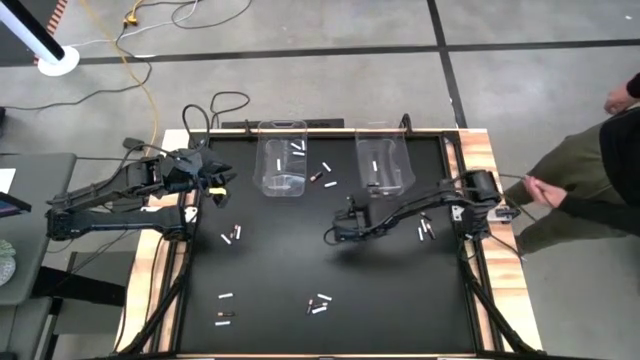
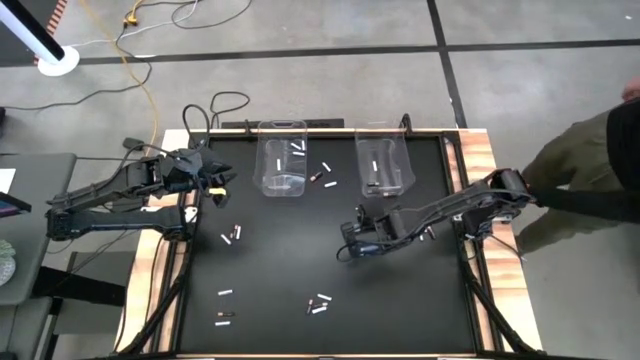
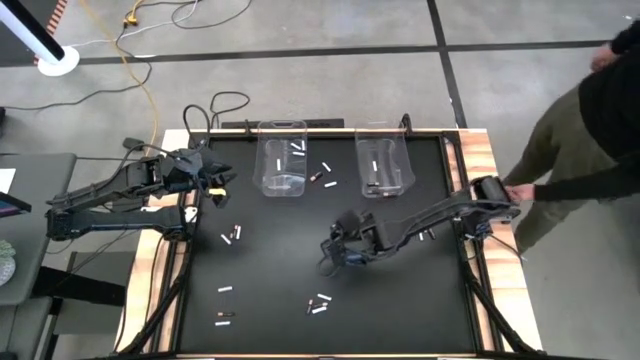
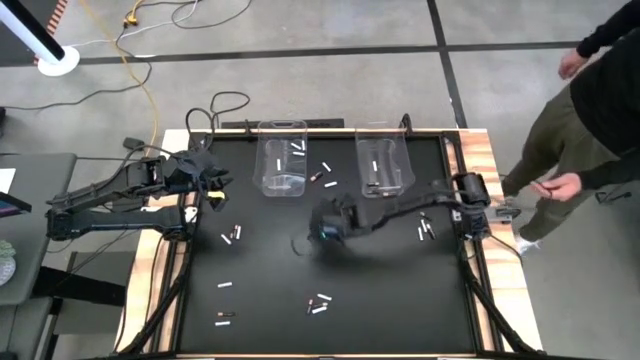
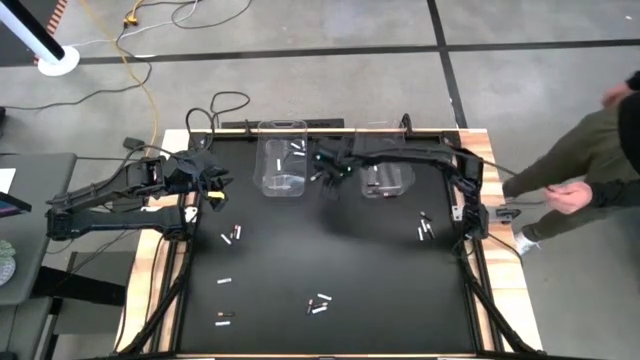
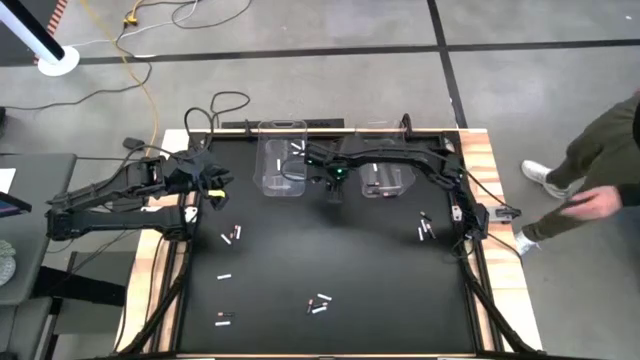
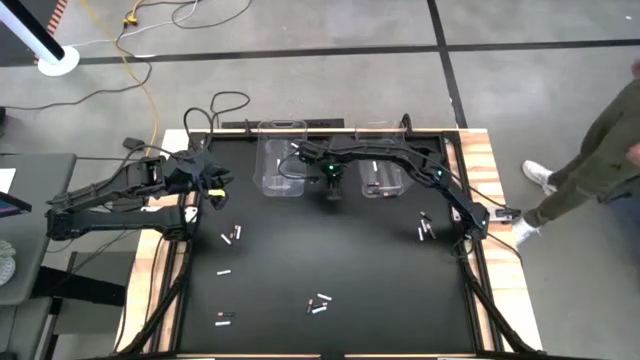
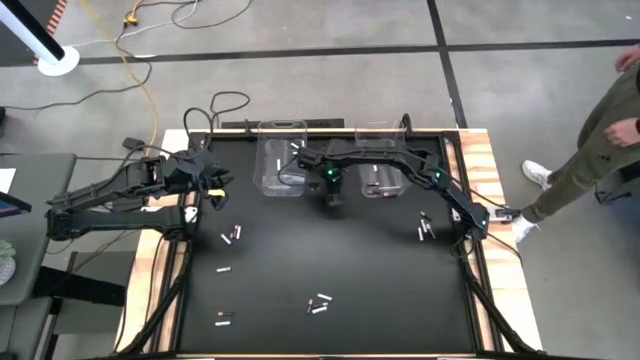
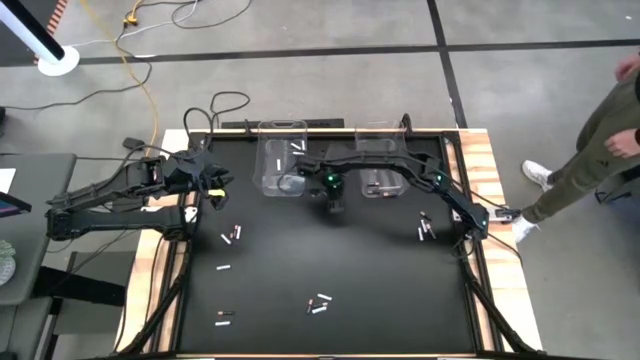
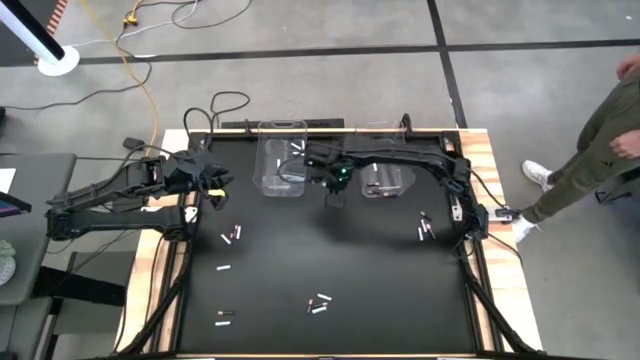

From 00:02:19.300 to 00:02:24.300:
Task: Sort batteries
Put the white battery into the left transparent bin

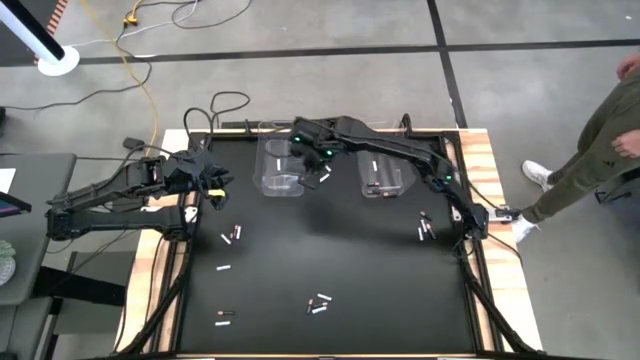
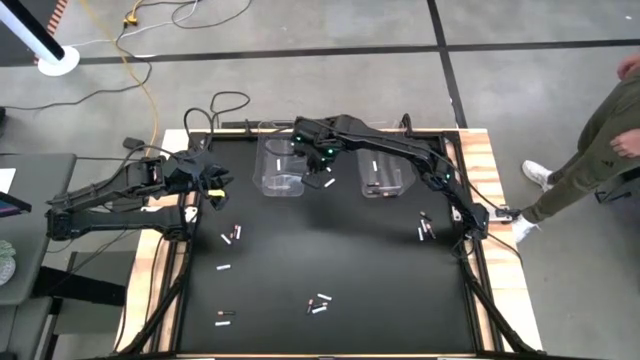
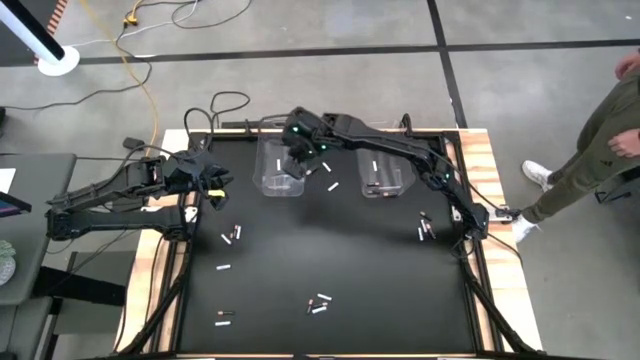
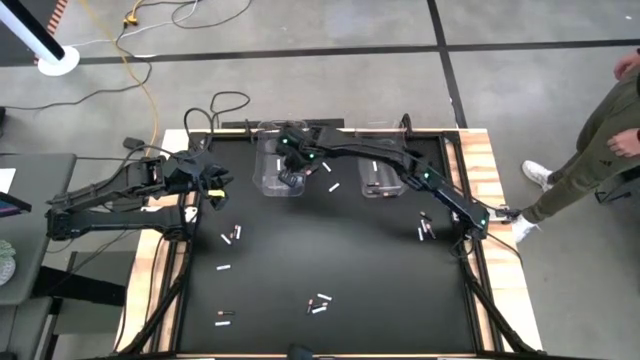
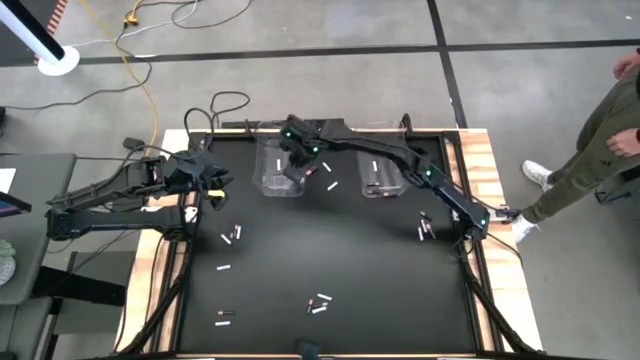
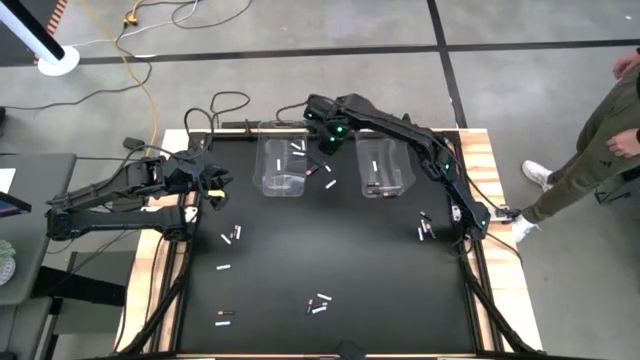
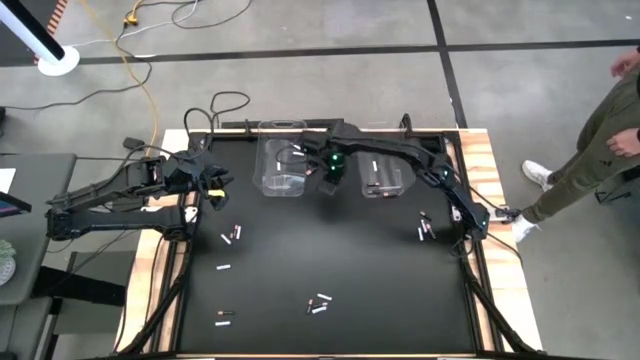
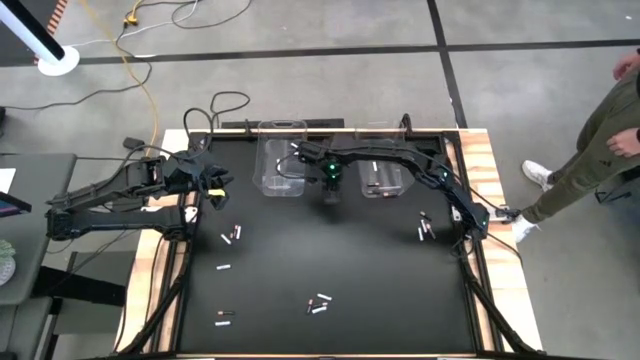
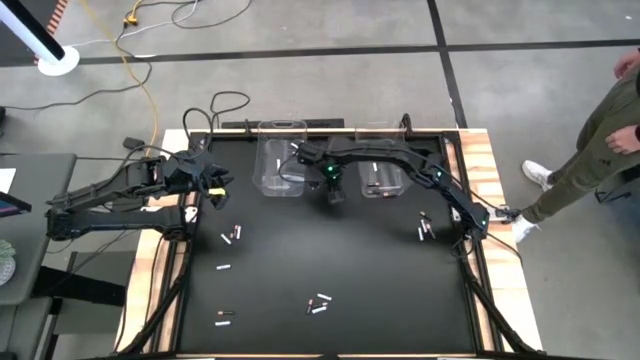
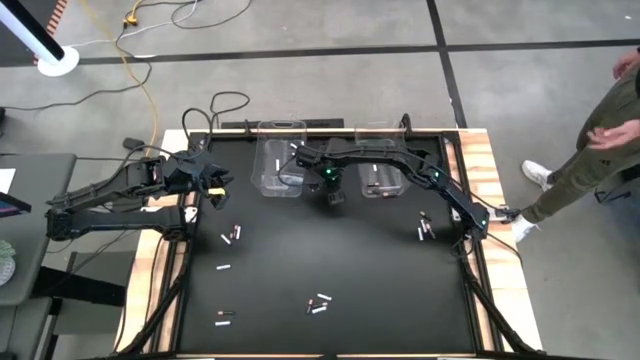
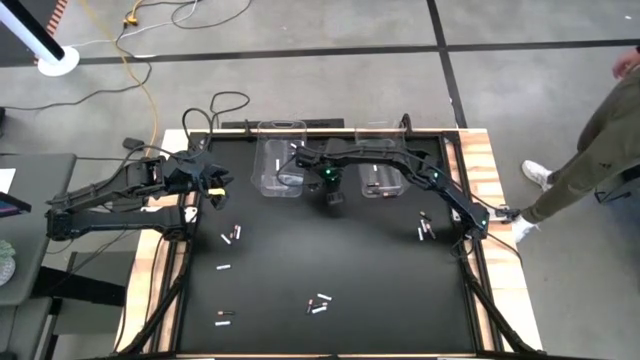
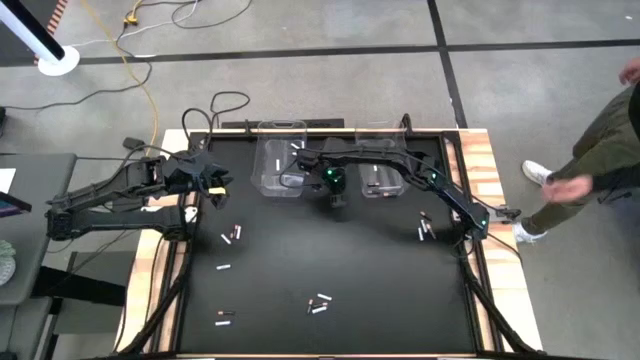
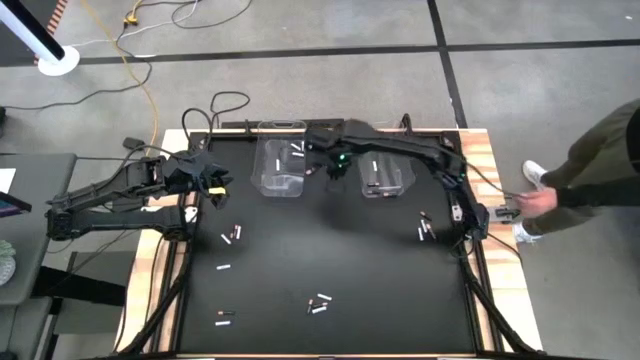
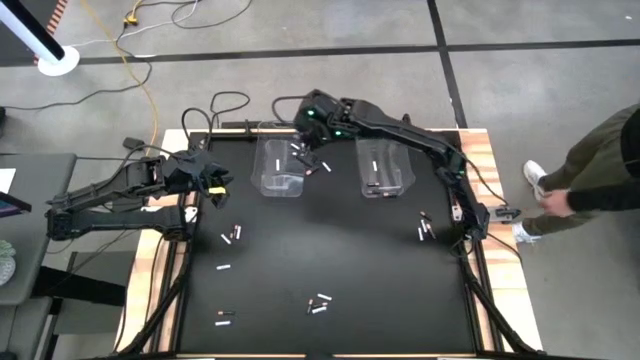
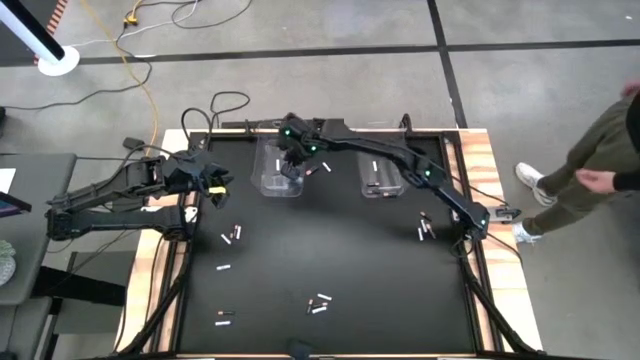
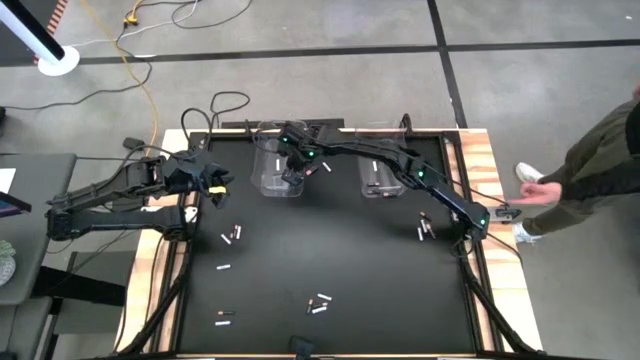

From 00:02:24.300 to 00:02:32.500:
Put the white battery into the left transparent bin

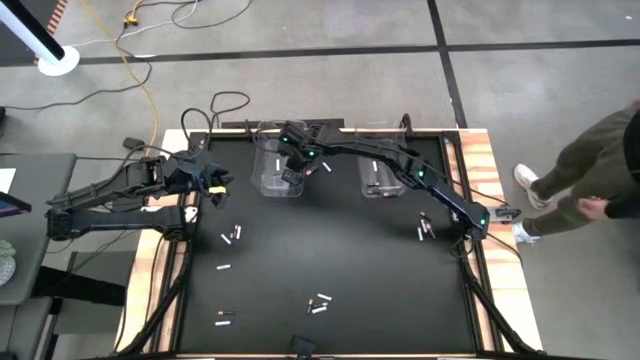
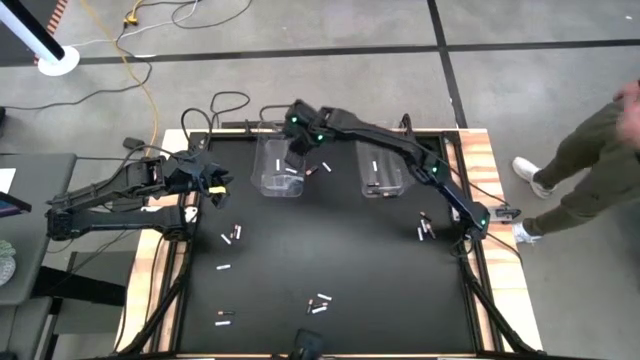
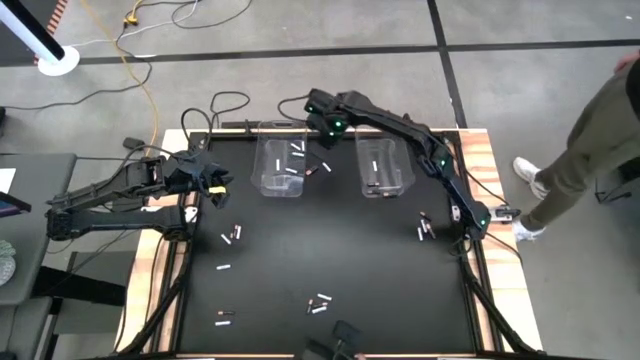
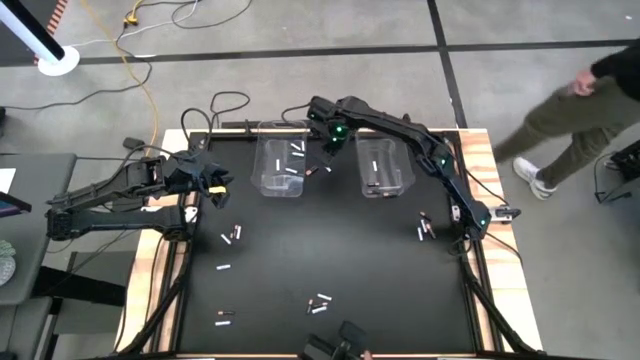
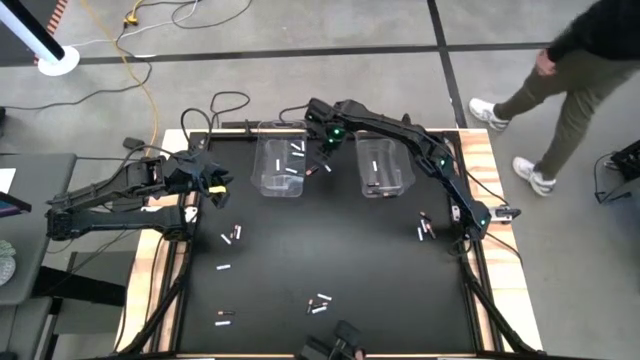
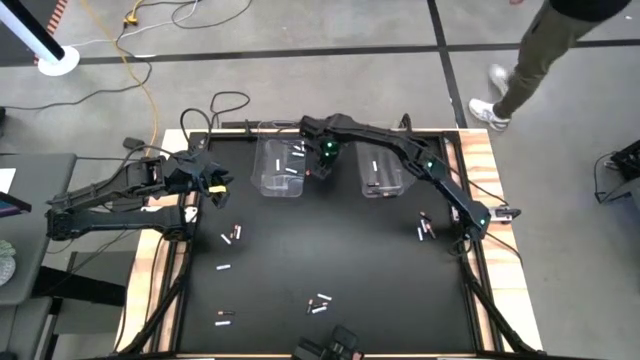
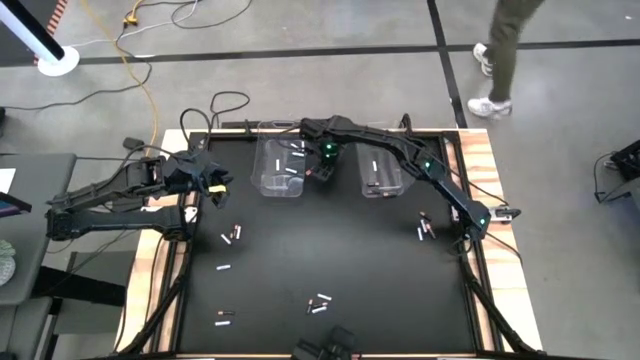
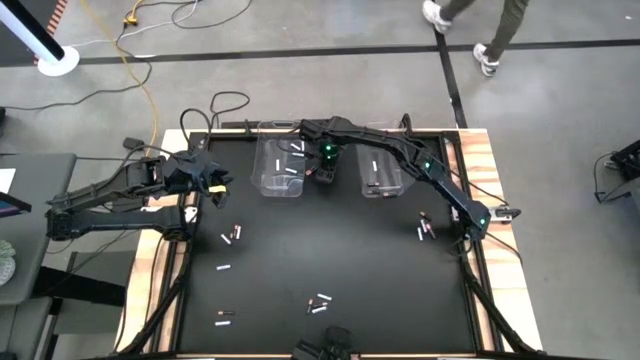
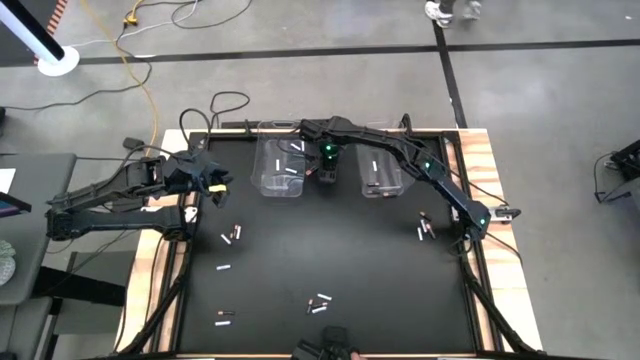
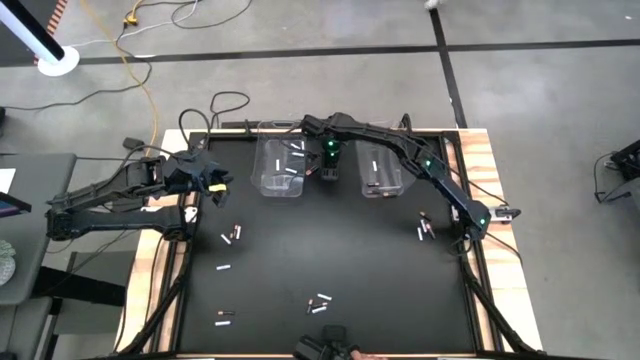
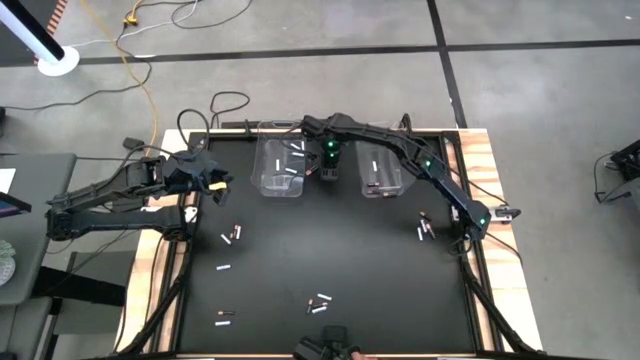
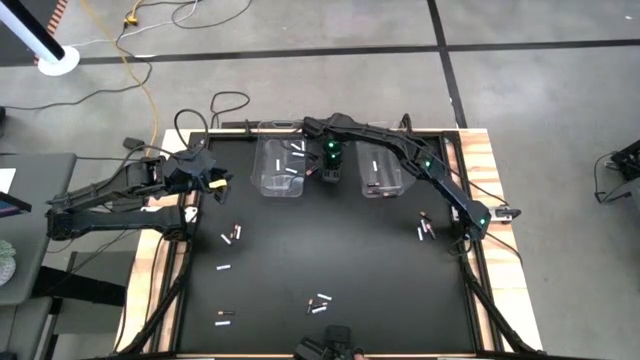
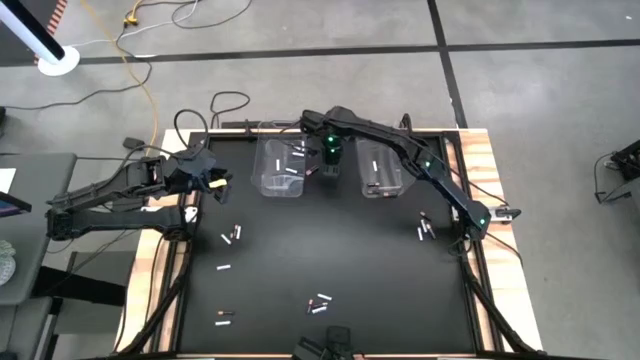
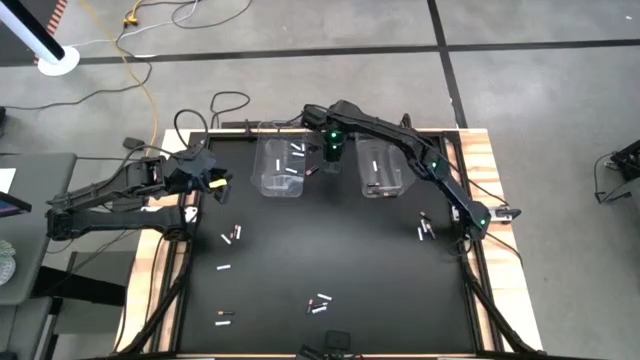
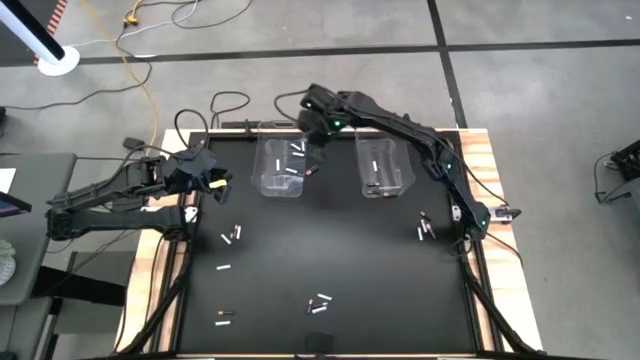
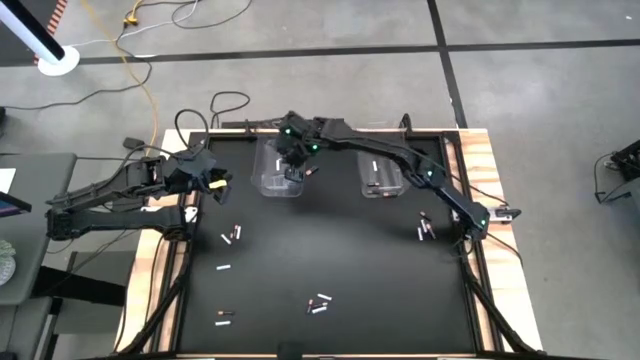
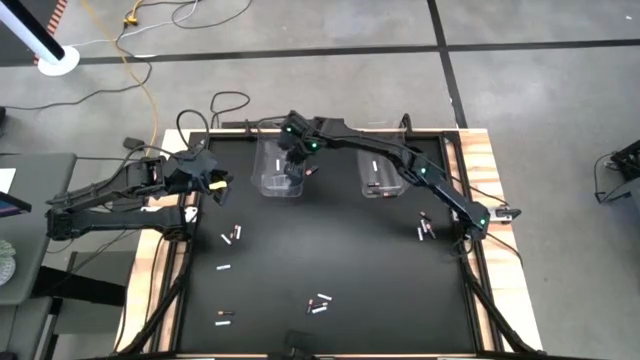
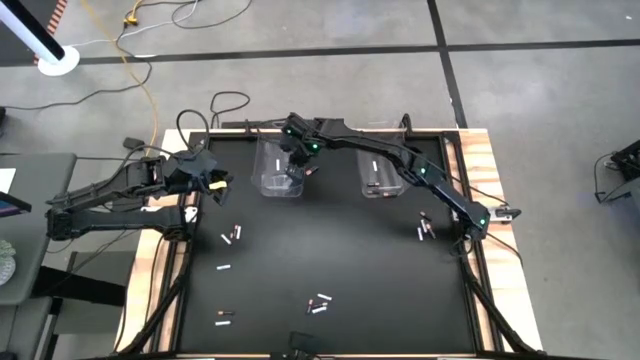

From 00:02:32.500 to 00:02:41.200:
Put the white battery into the left transparent bin
